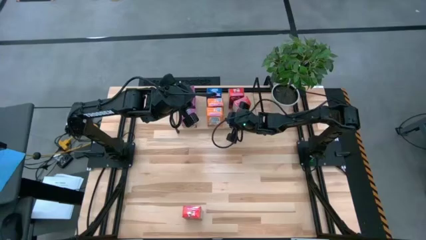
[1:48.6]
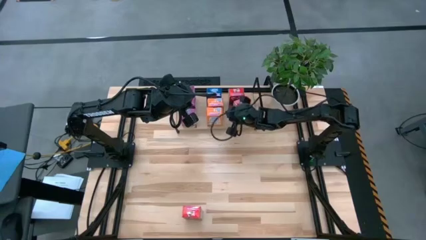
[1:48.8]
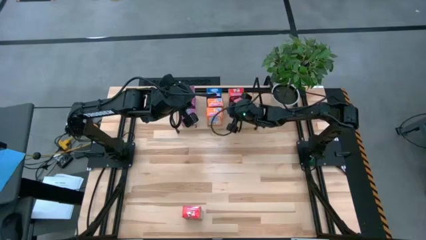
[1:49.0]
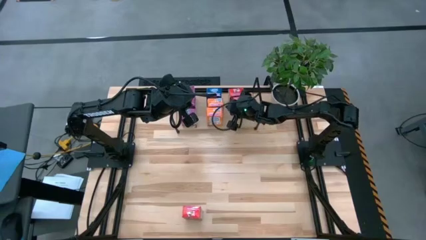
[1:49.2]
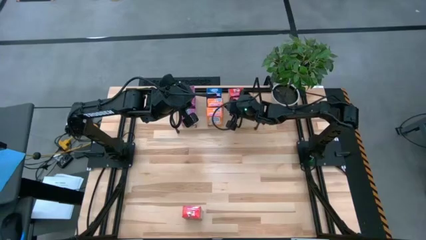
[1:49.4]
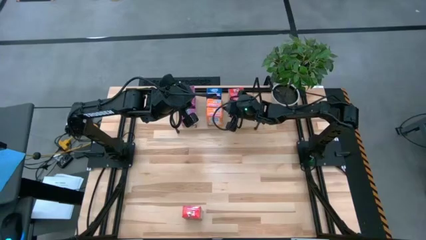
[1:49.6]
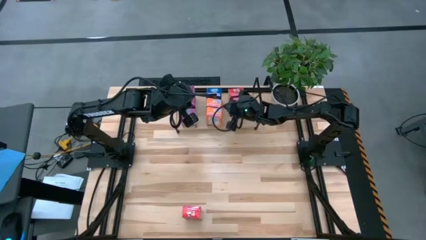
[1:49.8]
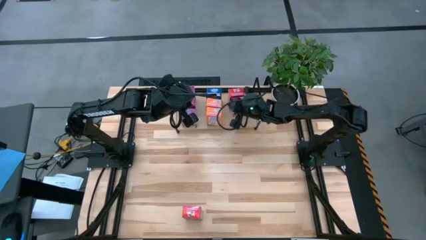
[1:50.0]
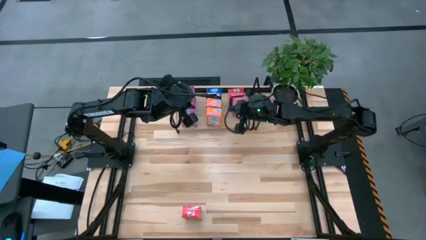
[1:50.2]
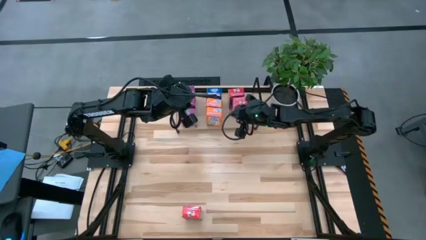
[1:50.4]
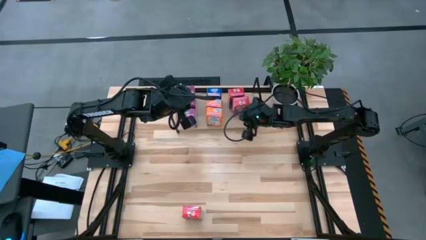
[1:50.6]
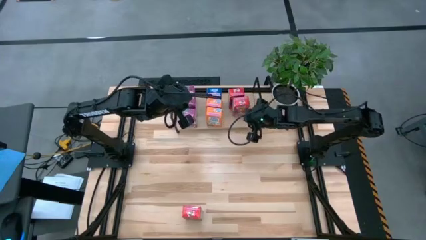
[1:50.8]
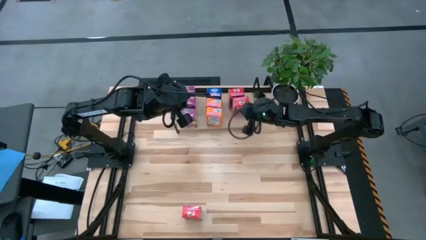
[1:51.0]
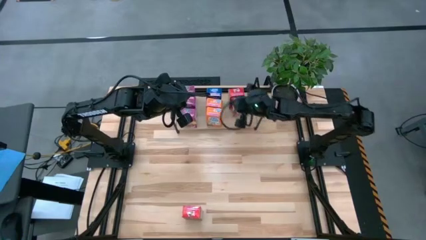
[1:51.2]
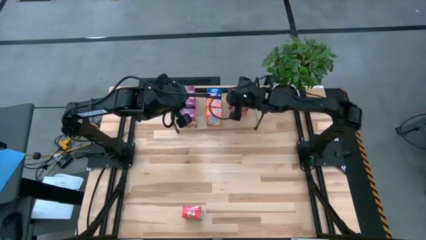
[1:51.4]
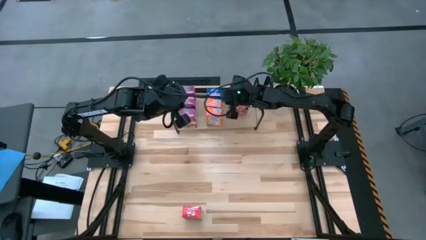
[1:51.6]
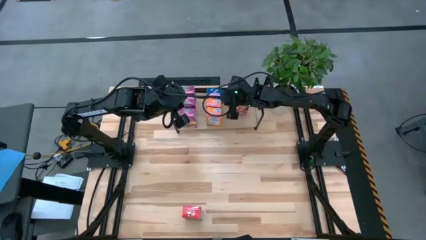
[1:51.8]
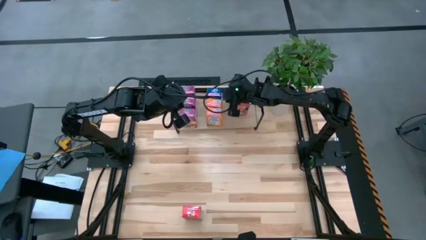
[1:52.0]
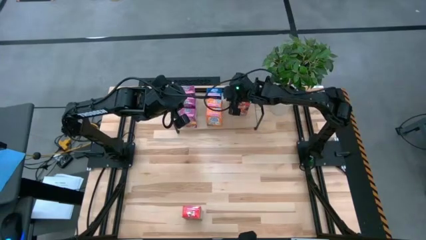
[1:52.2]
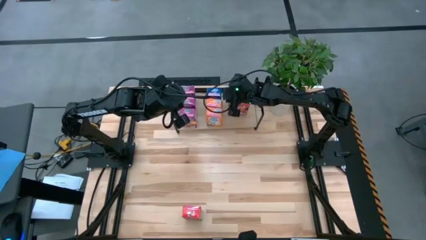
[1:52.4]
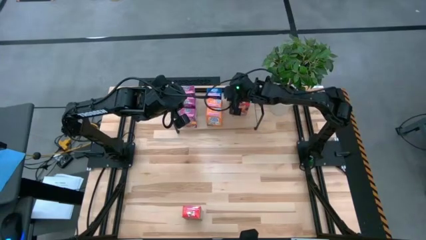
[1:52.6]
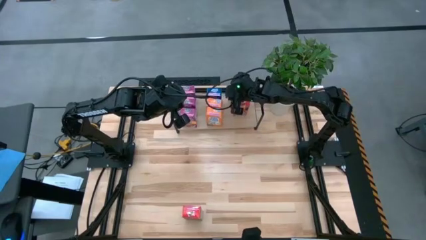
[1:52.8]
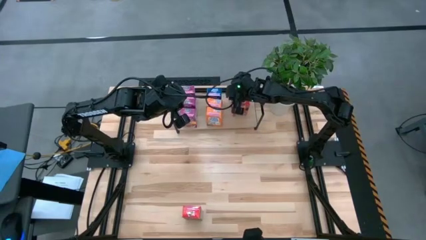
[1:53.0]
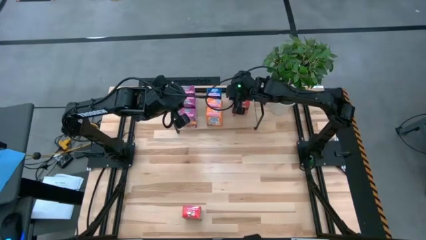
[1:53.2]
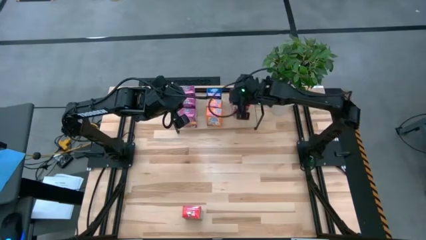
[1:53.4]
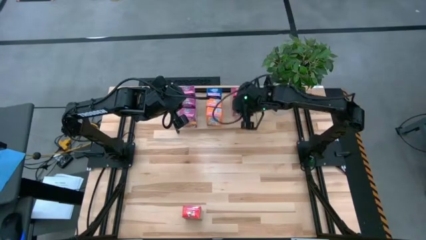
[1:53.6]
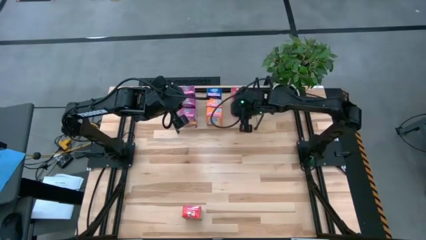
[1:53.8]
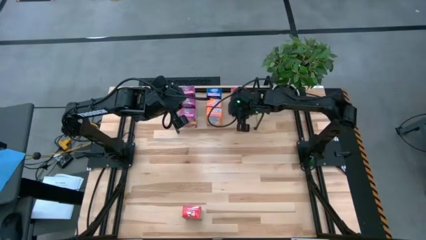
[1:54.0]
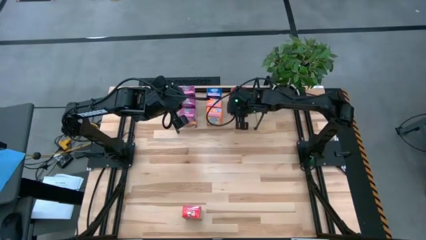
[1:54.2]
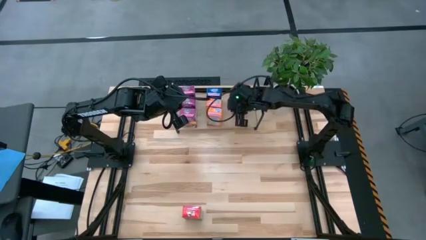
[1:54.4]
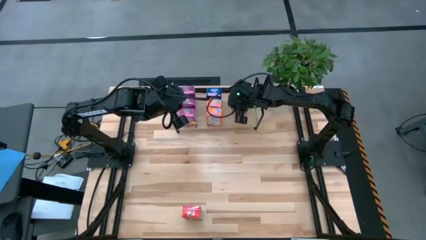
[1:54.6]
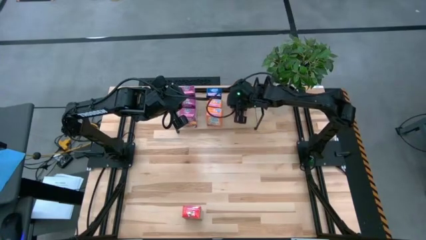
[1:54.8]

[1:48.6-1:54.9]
Task: Stack cereal on shelf
Adjust the cereal boxes on the shelf

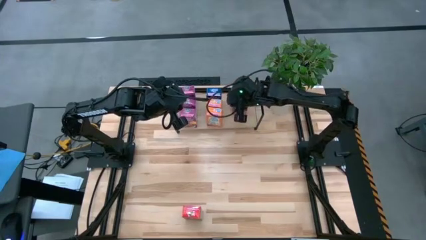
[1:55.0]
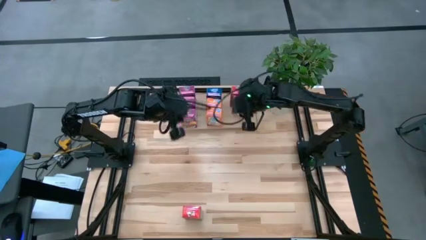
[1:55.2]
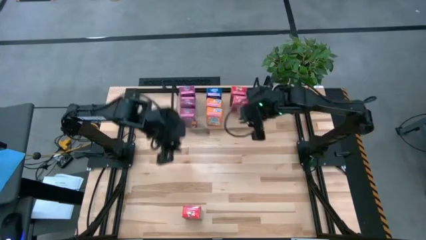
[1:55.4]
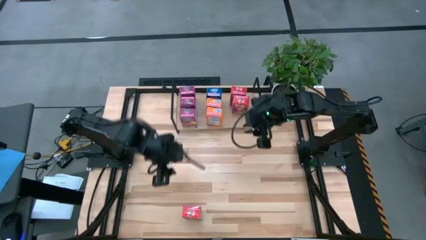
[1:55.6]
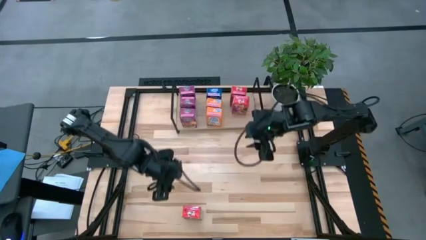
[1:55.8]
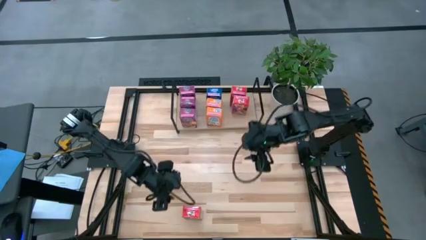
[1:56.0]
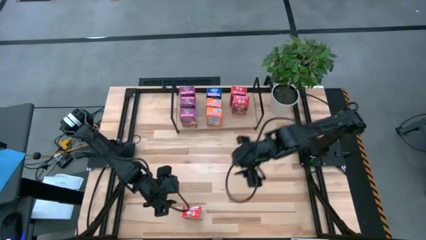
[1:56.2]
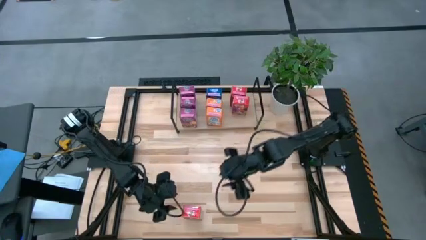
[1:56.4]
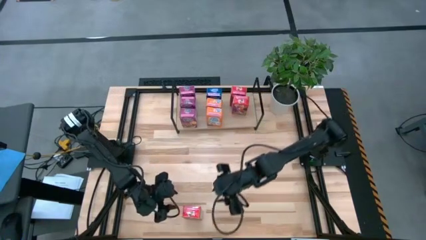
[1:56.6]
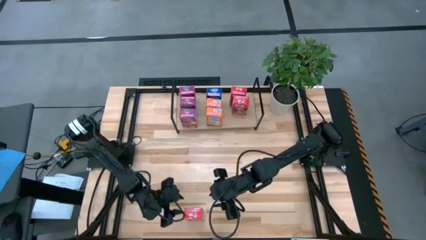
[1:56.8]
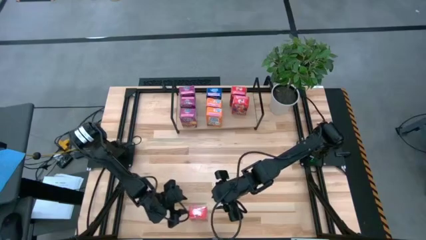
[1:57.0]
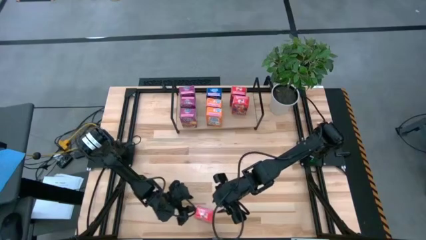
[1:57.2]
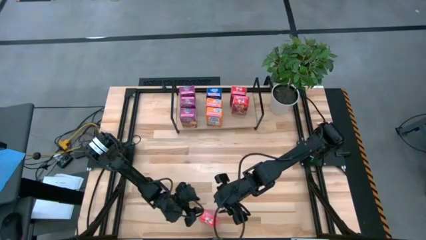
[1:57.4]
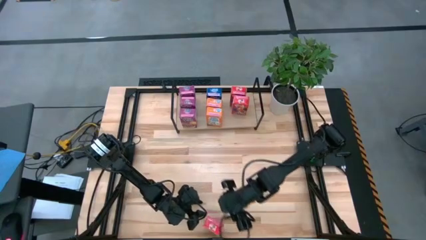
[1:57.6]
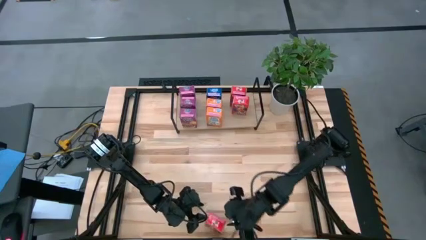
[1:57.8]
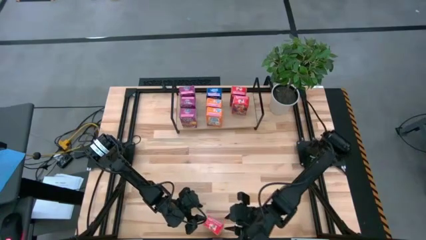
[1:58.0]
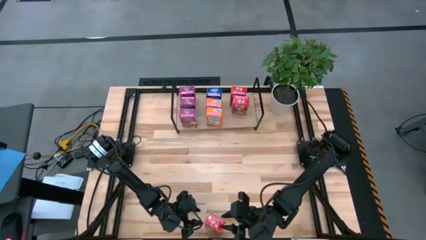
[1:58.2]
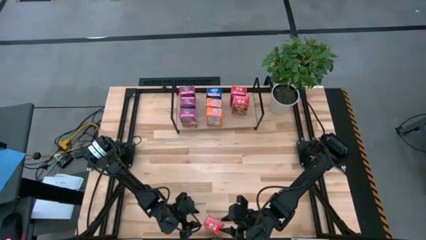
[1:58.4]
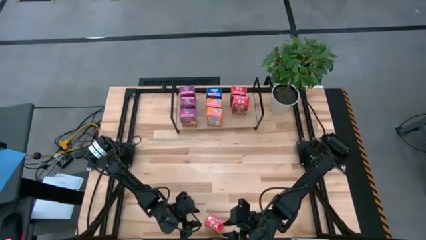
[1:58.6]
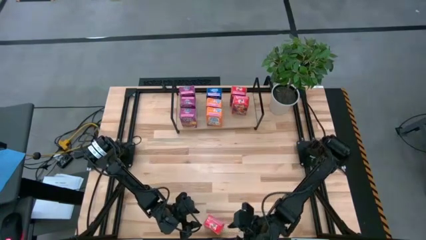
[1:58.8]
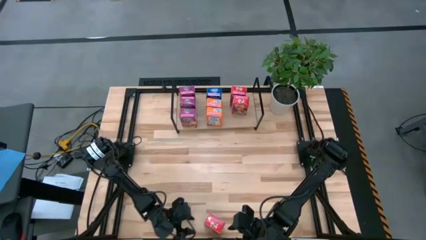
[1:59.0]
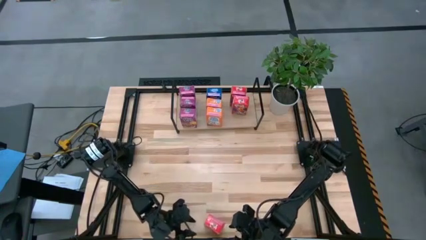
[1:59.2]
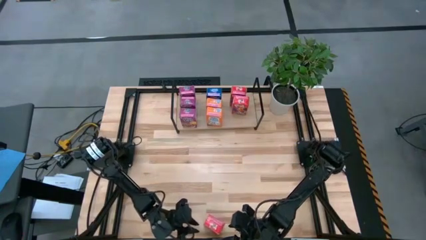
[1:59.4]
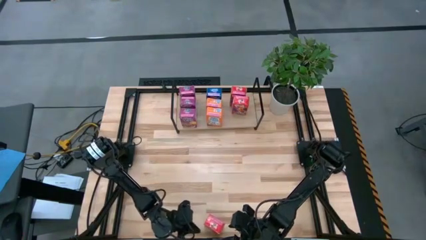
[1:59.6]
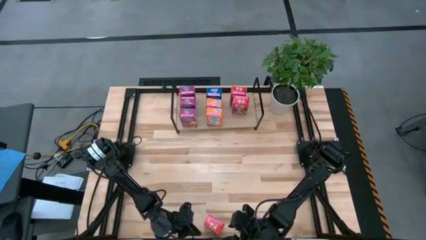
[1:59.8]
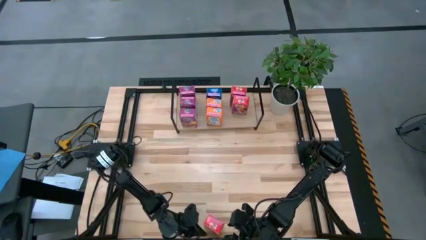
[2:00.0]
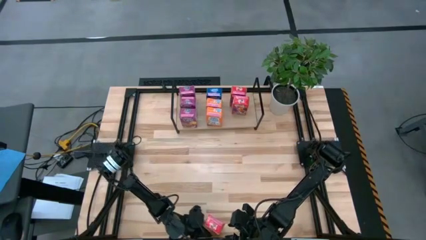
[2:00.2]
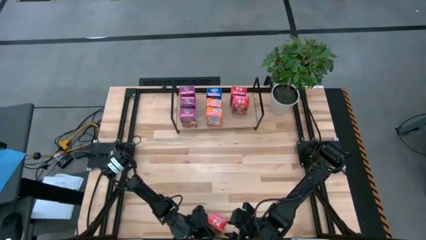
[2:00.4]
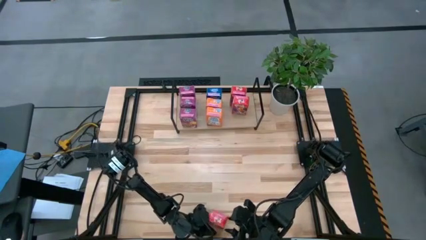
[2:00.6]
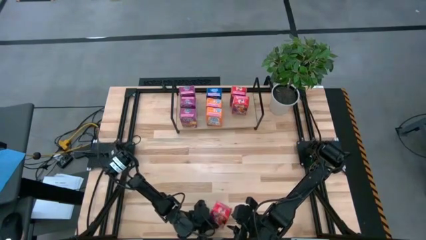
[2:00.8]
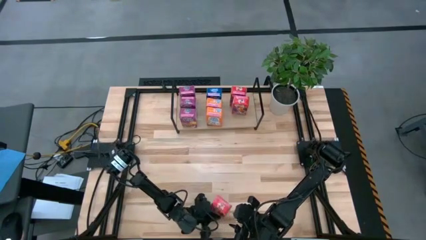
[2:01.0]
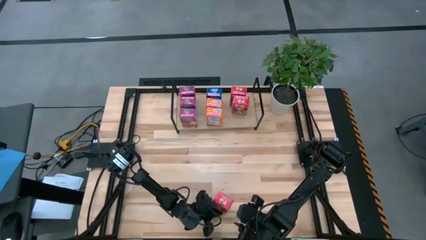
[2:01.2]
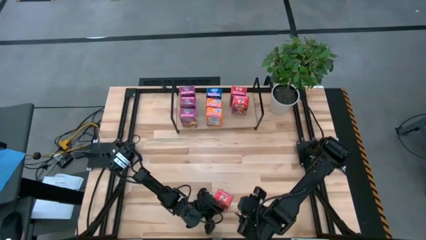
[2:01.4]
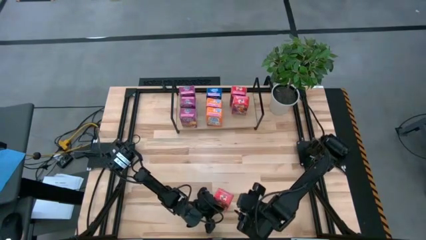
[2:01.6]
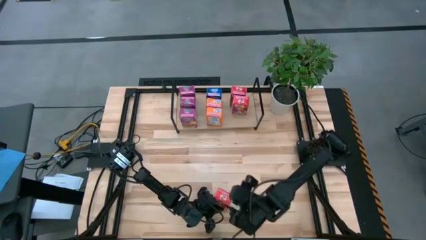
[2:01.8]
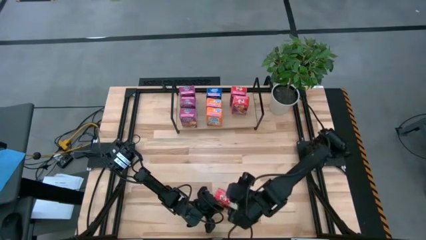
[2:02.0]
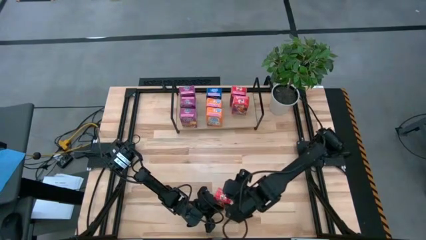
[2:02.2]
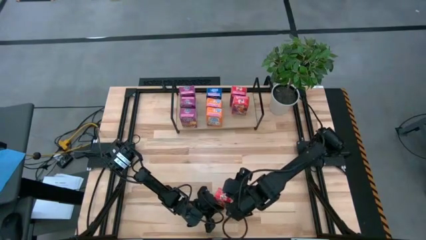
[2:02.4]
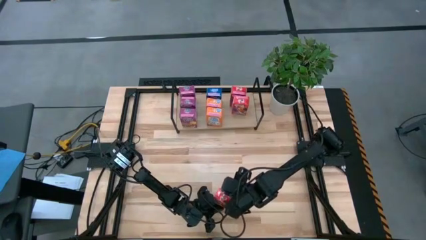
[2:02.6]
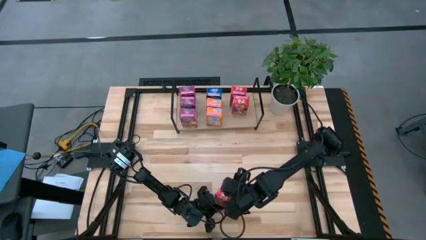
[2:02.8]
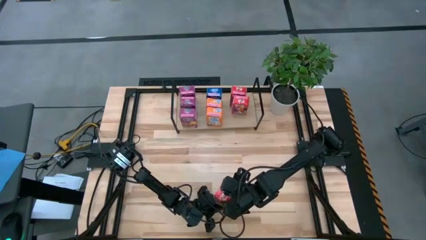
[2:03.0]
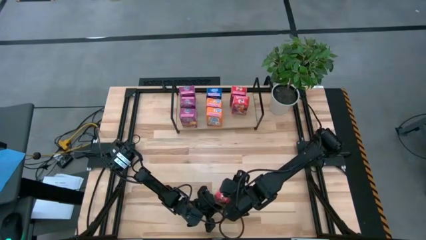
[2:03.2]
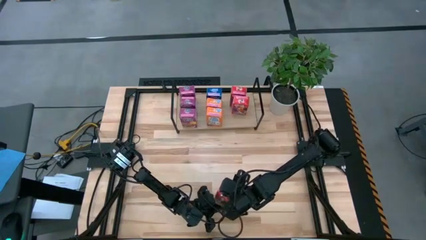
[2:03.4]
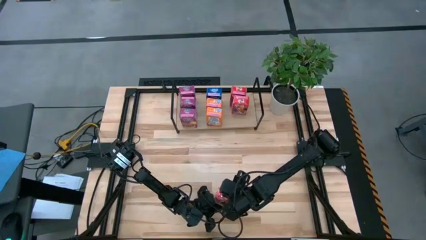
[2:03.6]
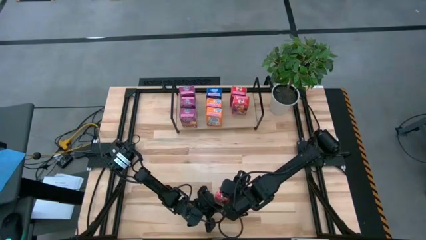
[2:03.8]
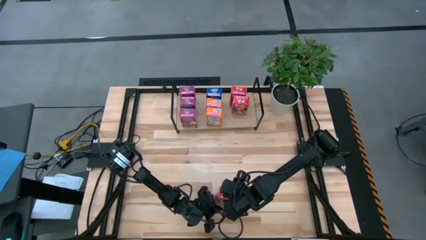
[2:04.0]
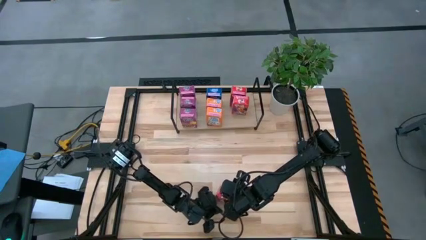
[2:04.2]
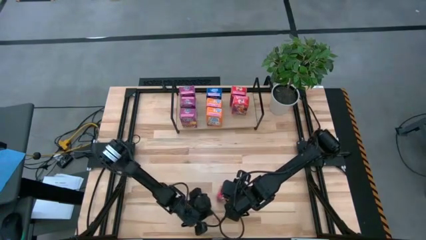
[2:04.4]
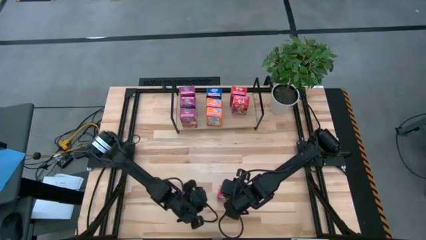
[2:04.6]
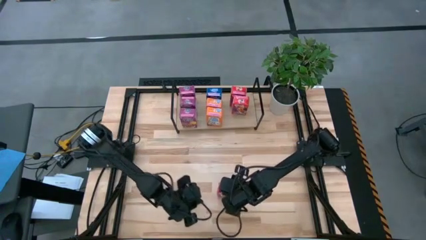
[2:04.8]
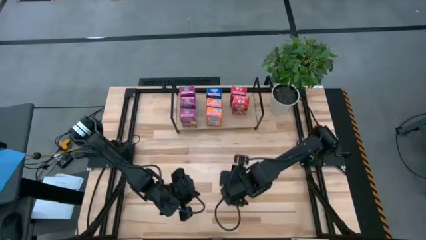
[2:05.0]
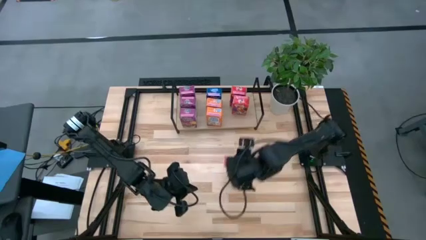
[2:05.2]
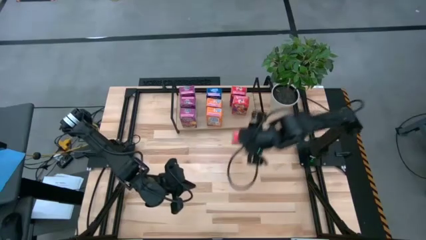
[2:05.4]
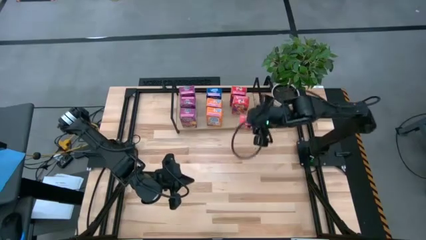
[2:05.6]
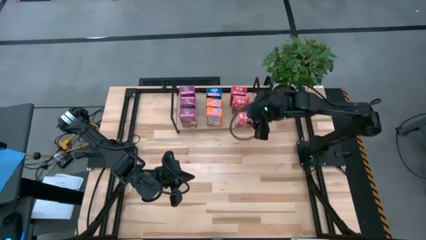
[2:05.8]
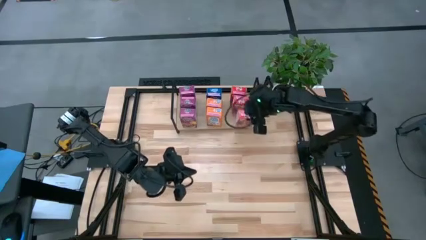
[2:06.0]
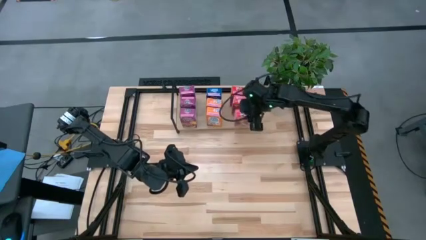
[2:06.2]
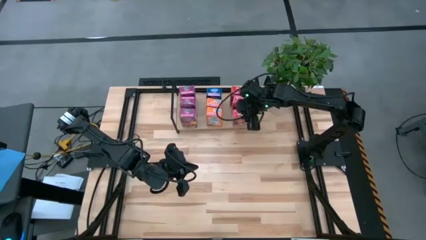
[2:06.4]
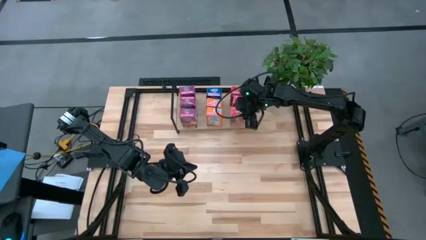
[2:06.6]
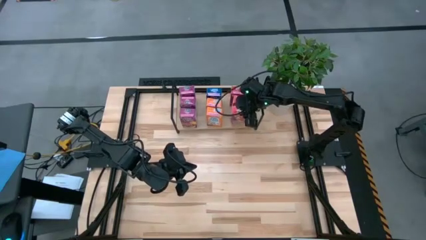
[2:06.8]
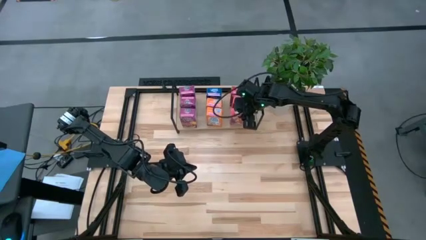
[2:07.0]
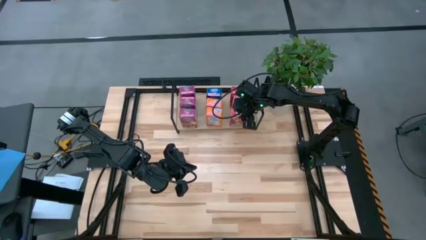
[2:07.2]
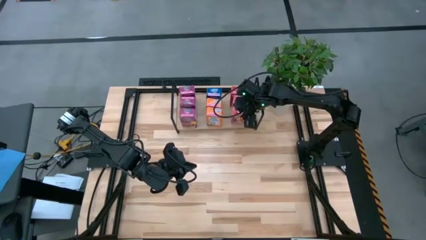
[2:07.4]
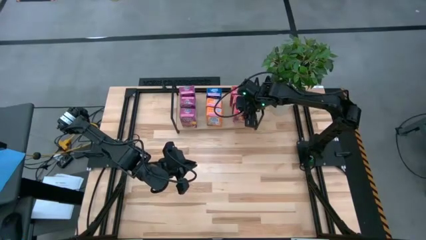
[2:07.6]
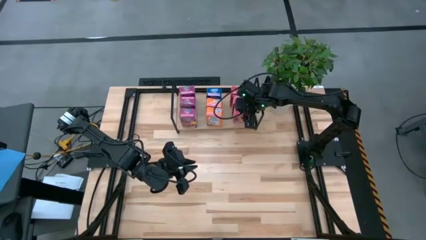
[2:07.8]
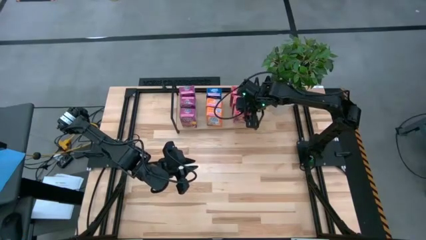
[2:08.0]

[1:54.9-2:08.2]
Put the red cereal box on the shelf aligned with the other red cereal box
